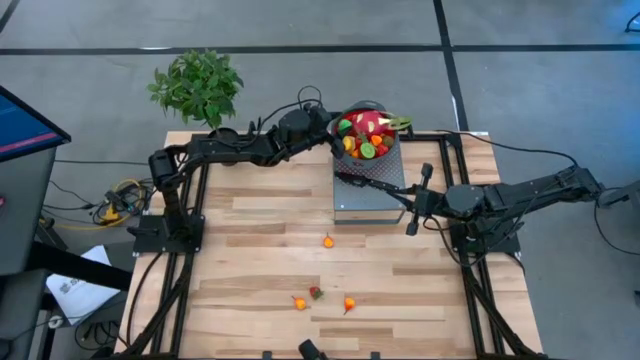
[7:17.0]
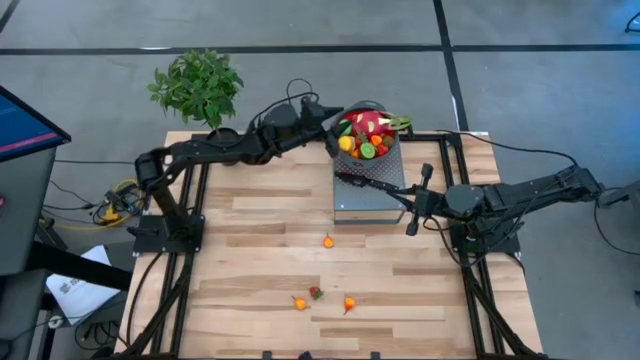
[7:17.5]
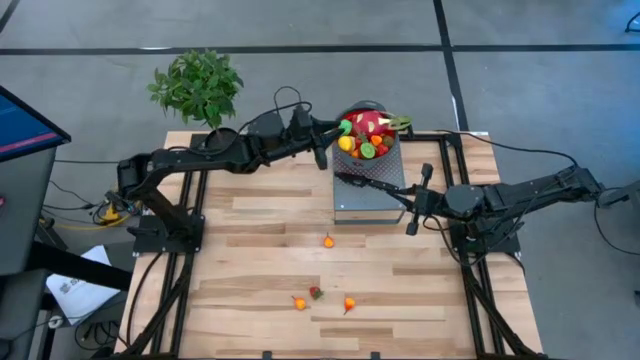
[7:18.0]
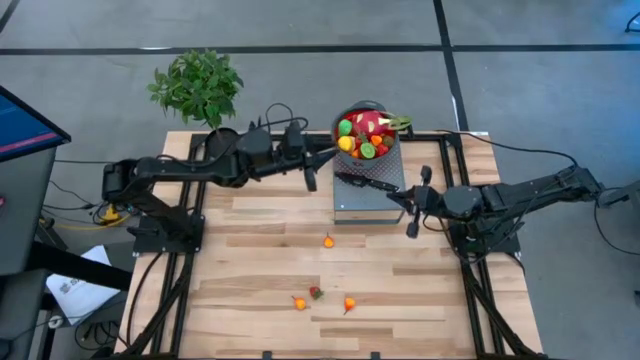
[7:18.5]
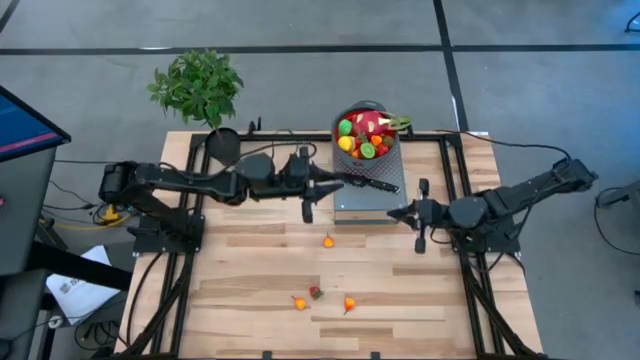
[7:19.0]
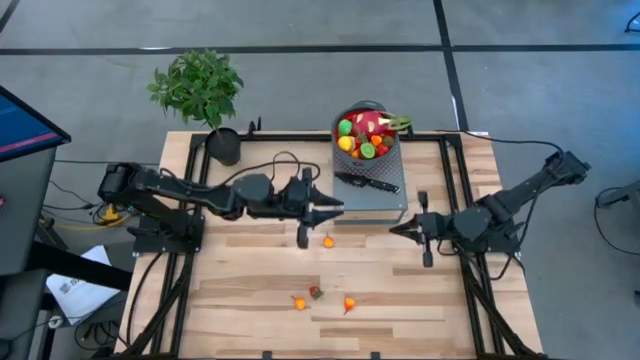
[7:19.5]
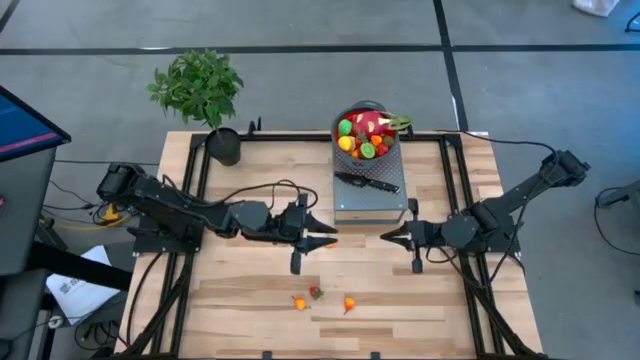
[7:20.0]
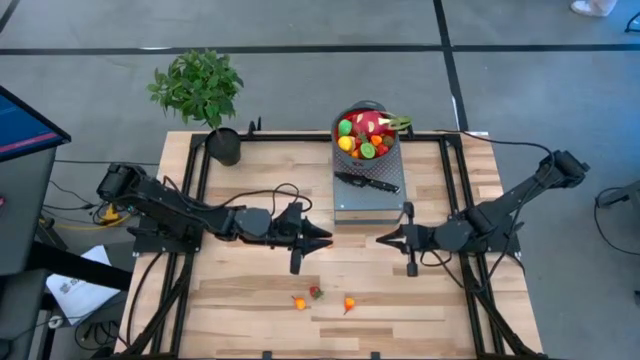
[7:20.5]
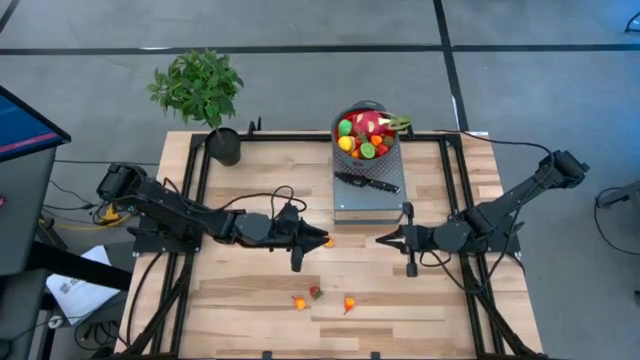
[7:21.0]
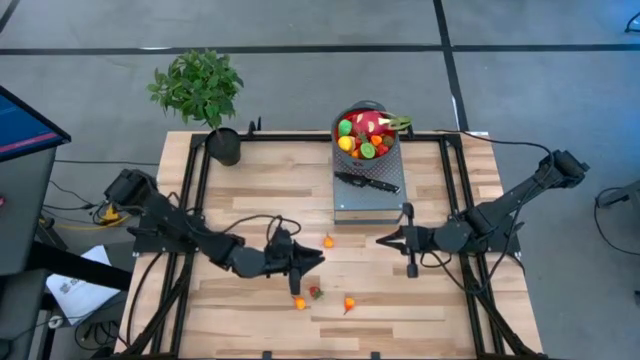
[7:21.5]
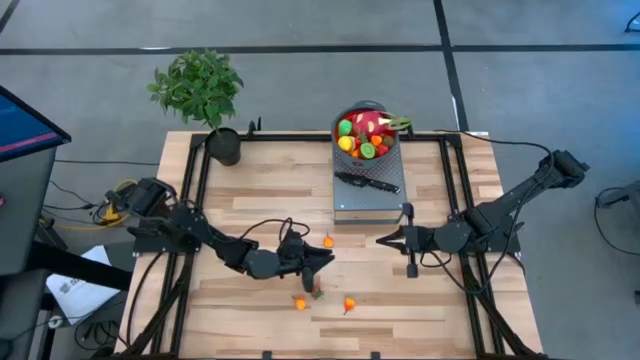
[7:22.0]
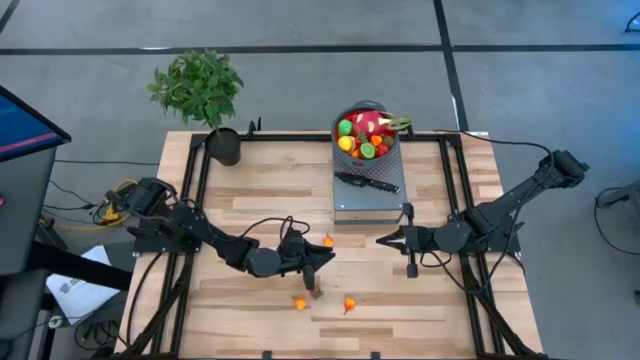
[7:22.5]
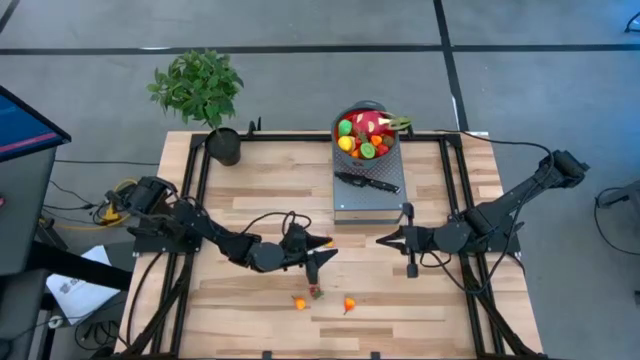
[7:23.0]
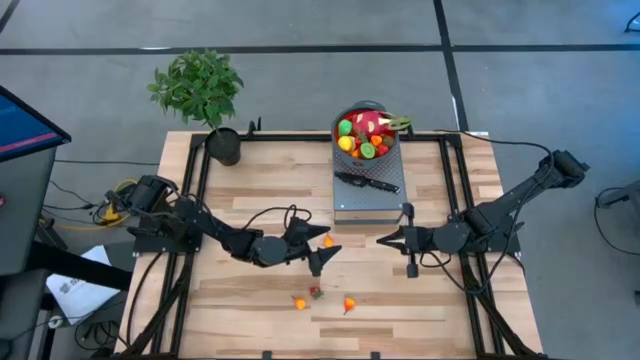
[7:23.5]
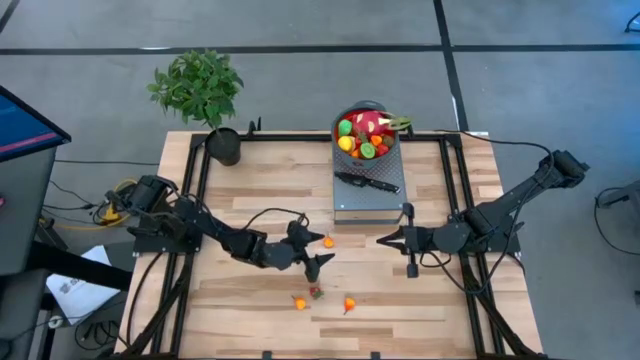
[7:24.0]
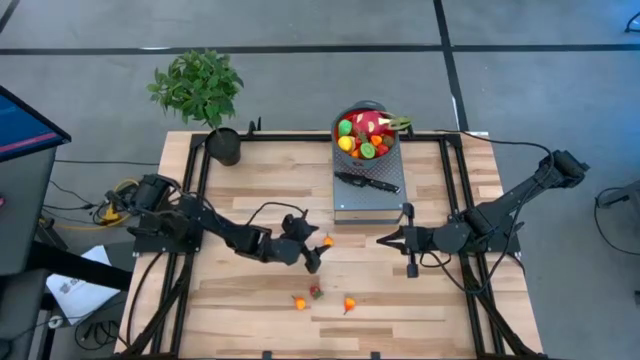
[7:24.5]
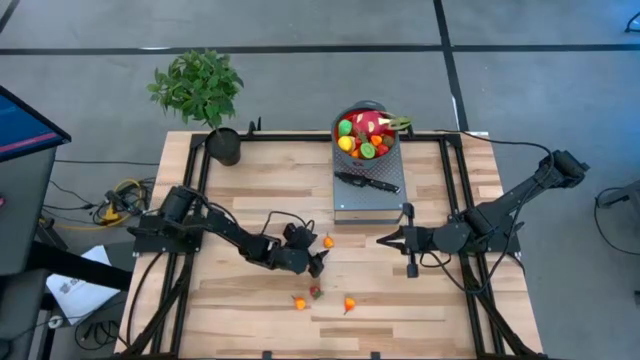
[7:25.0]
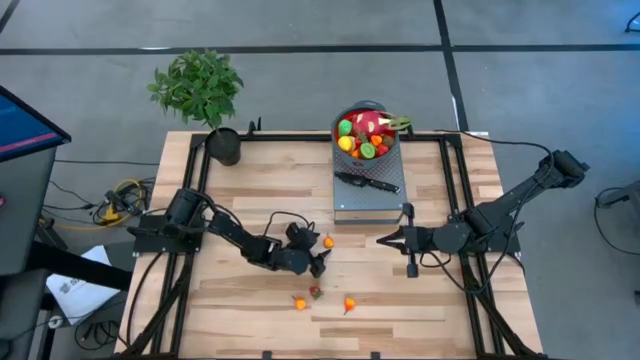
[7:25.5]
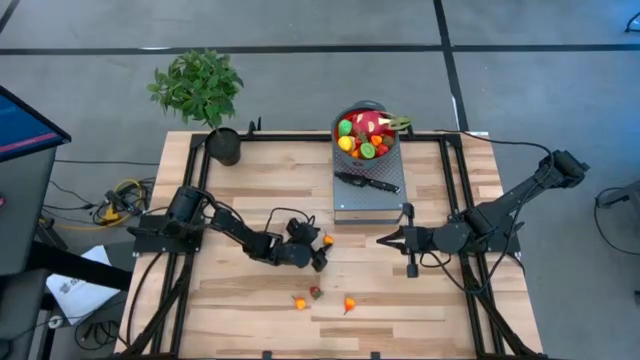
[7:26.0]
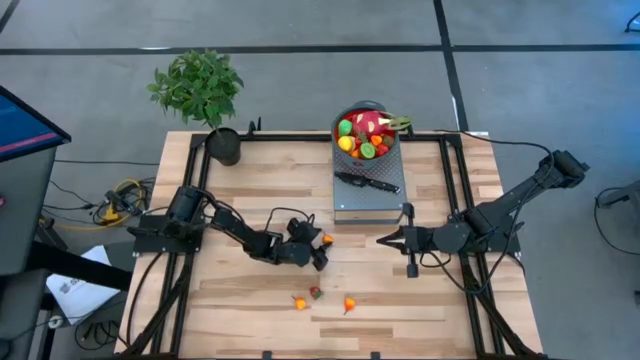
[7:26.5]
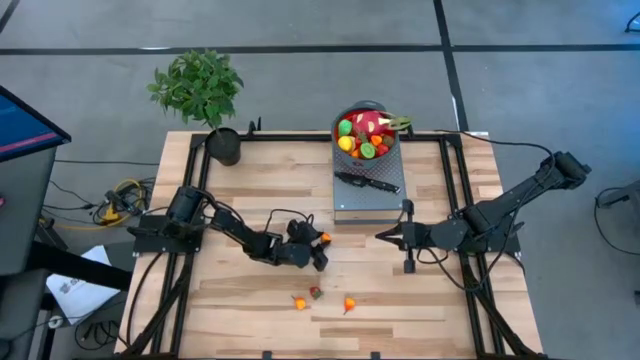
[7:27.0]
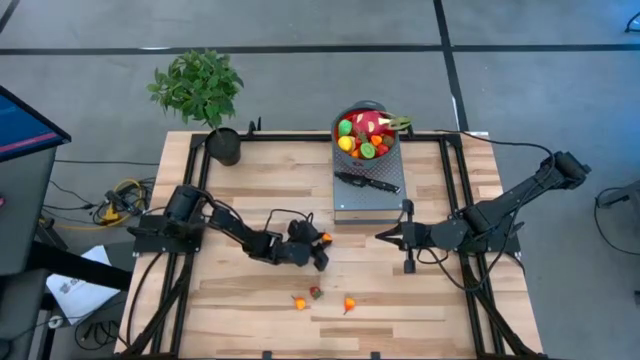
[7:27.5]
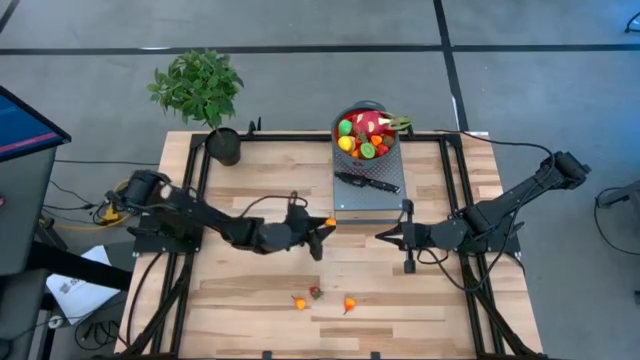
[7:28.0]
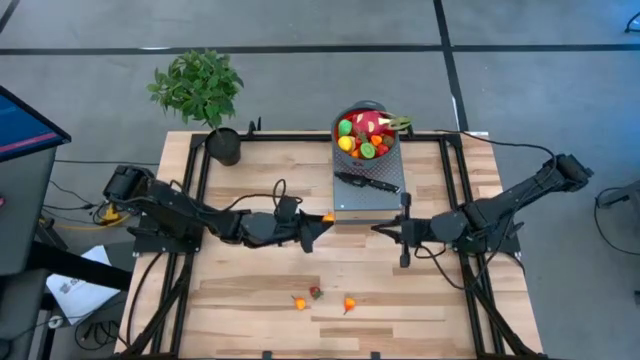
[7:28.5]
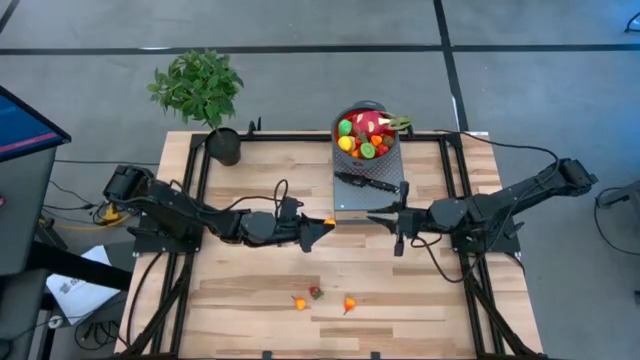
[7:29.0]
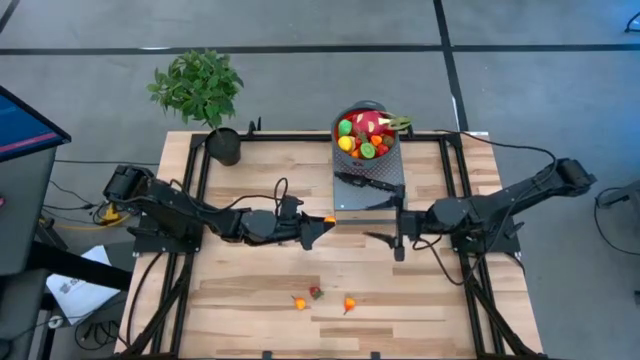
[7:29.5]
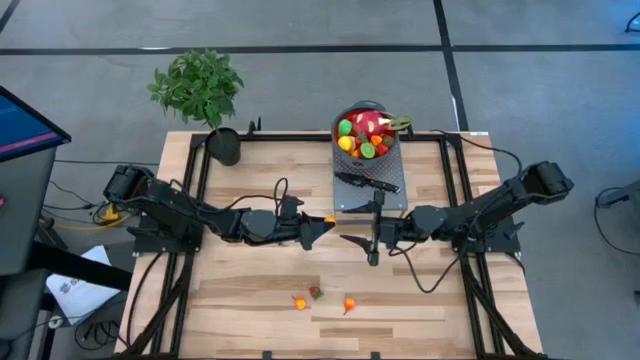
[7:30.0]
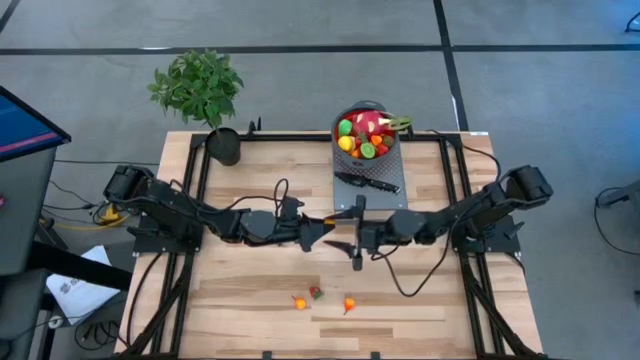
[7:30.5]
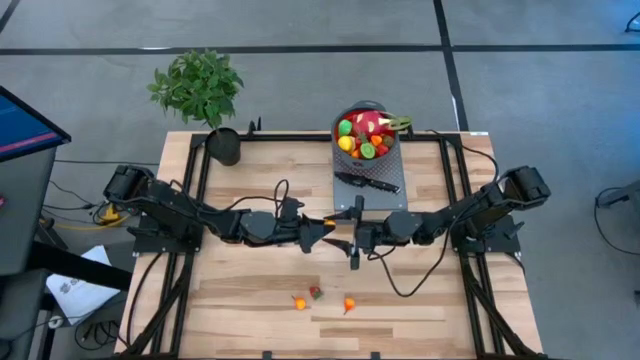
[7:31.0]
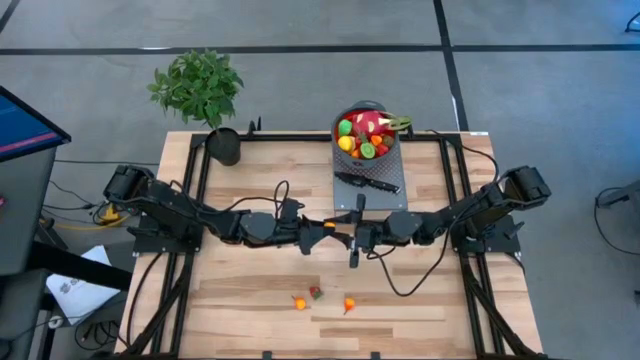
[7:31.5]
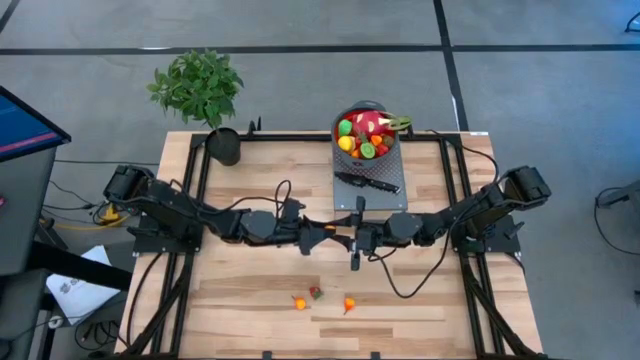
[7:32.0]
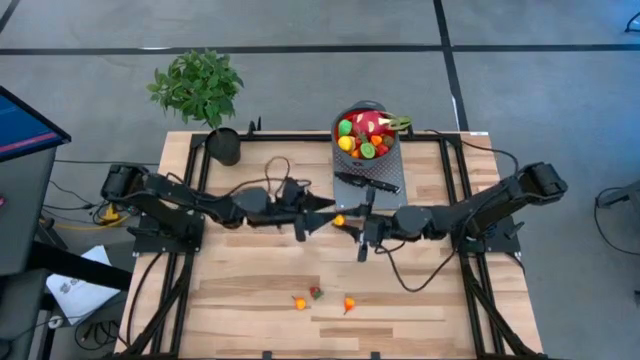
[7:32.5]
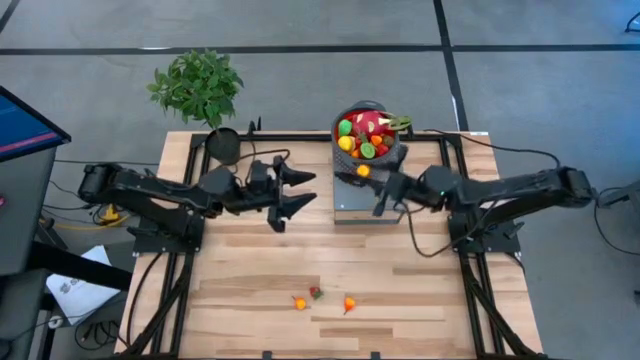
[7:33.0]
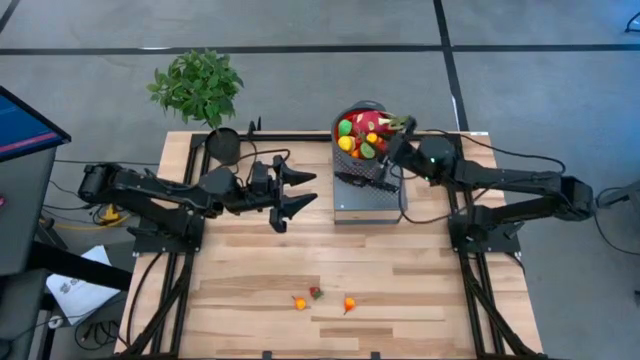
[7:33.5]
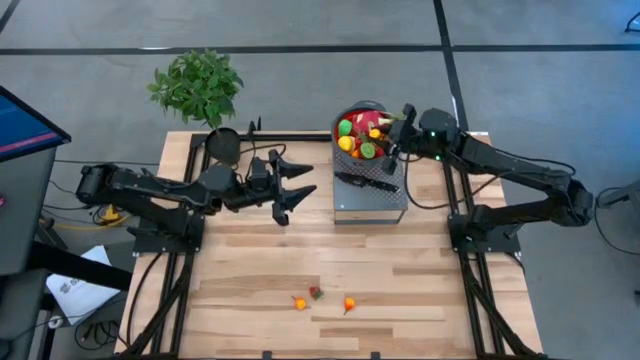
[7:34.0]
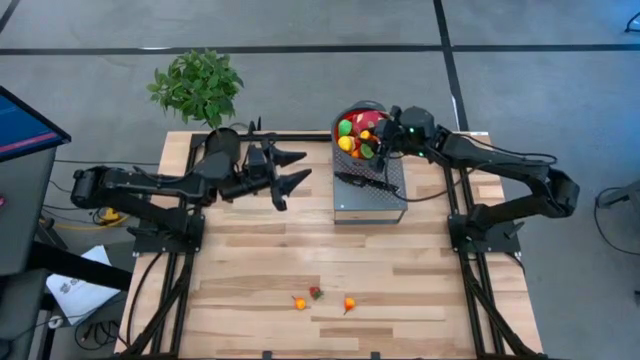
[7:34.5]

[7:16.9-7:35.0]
Task: Pick & Place Fruit
Put the yellow pear into the red colander on the shelf

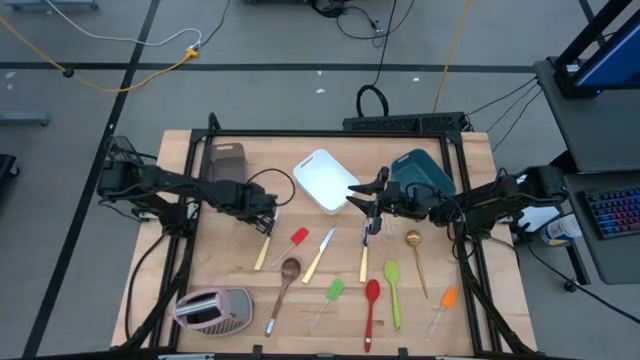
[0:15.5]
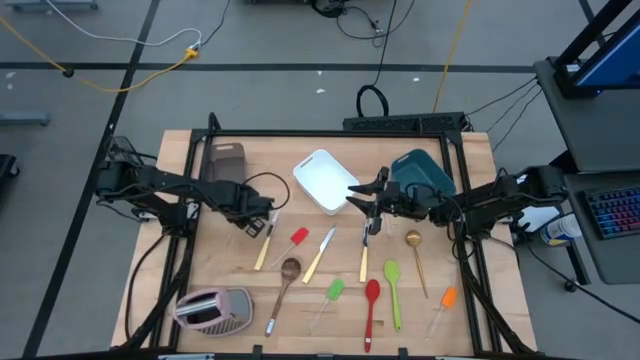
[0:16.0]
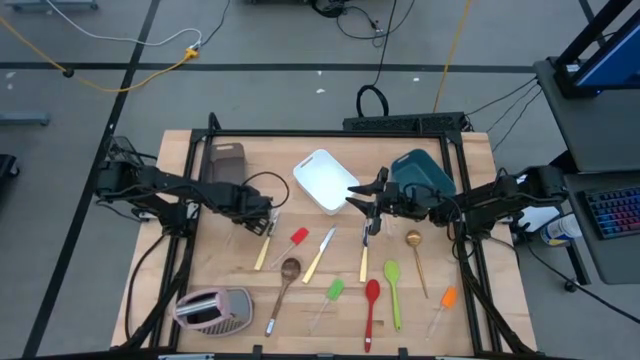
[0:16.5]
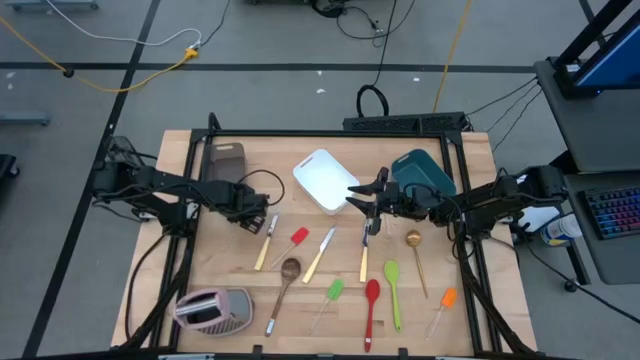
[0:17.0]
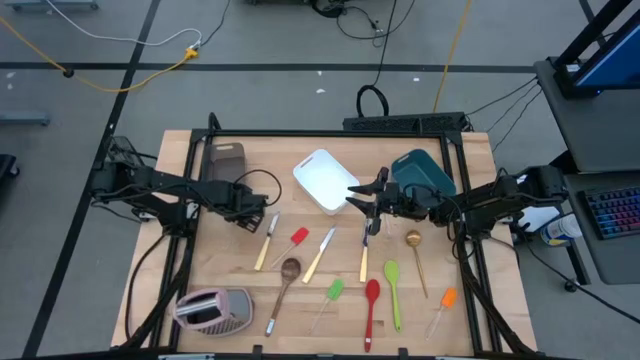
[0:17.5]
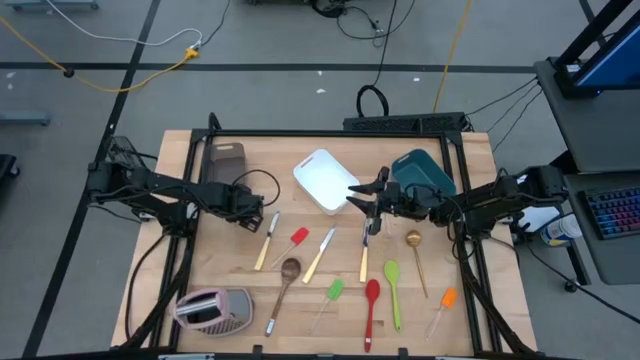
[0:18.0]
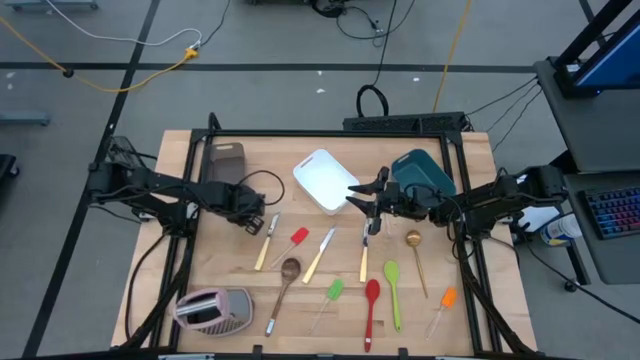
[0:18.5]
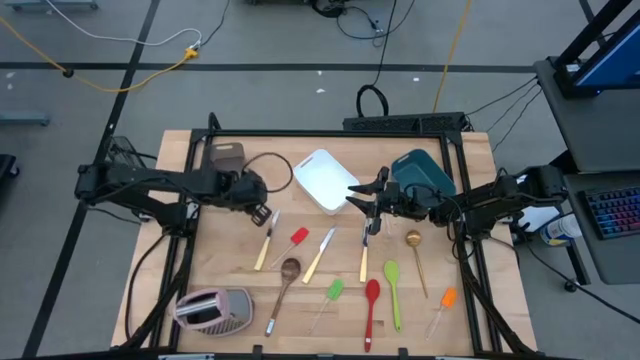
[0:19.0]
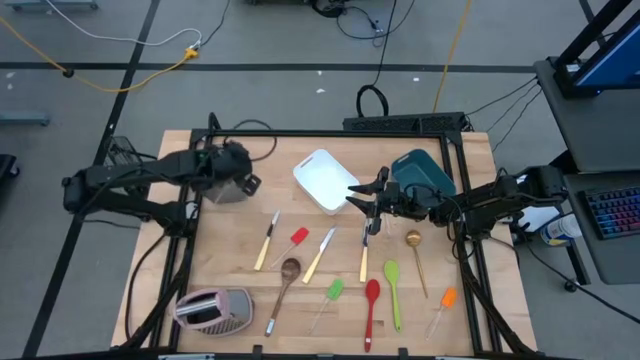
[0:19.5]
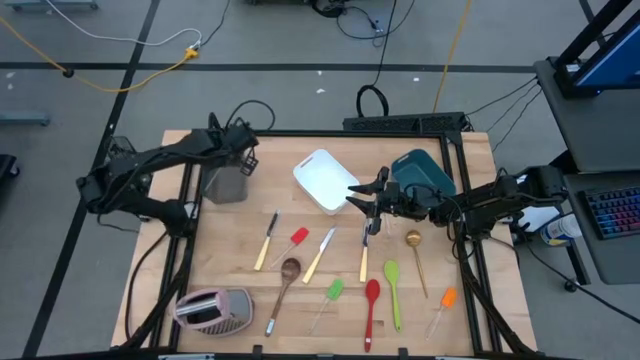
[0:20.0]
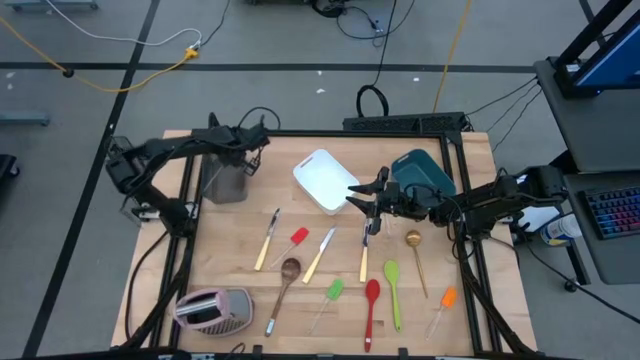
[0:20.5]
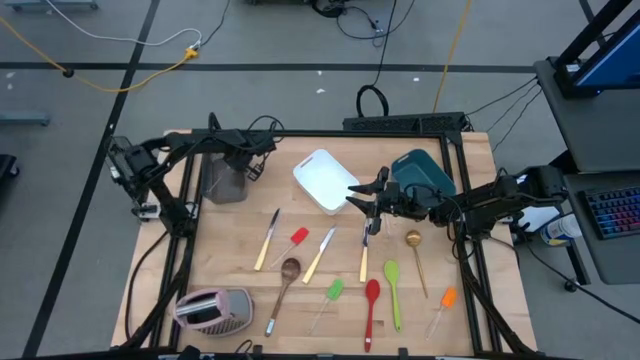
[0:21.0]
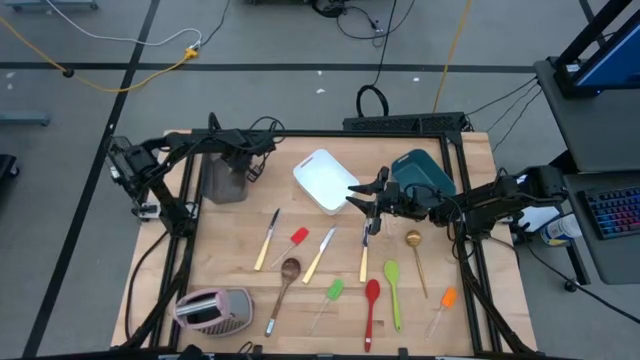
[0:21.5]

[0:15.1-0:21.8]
Task: Pick & Place Kitchen Items
Put the yellow spatula into the black bin
